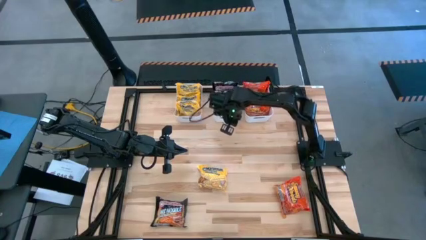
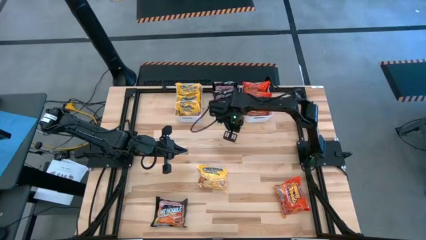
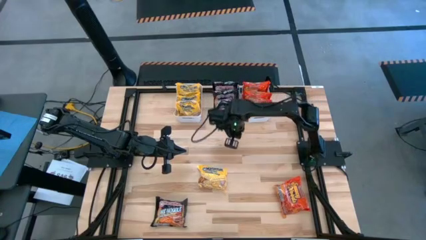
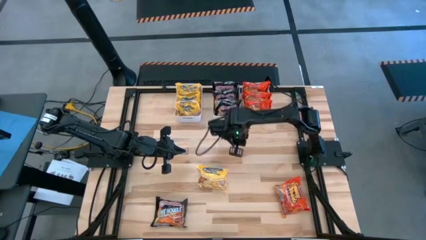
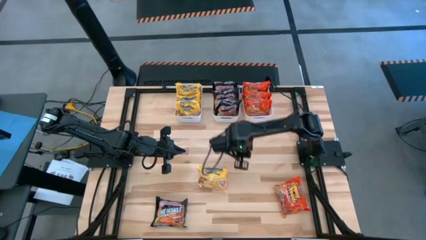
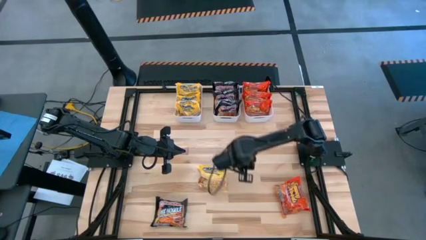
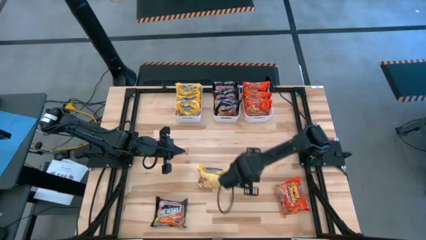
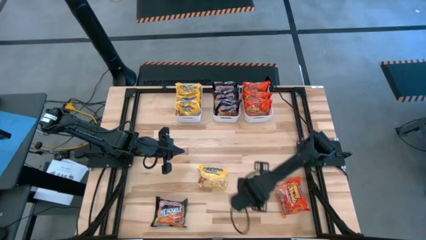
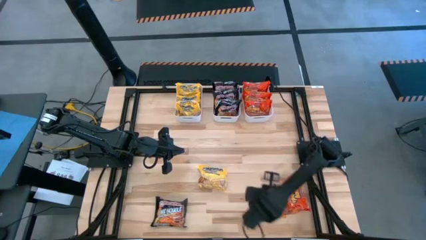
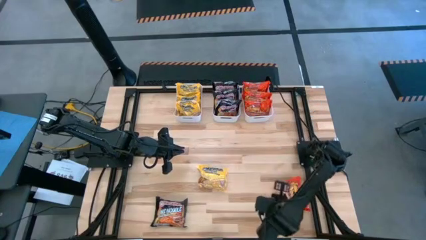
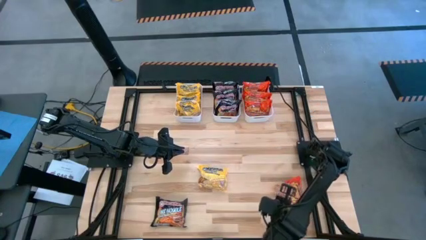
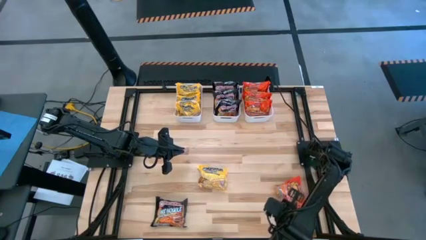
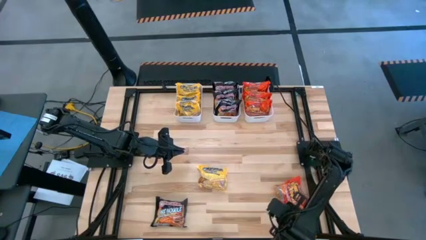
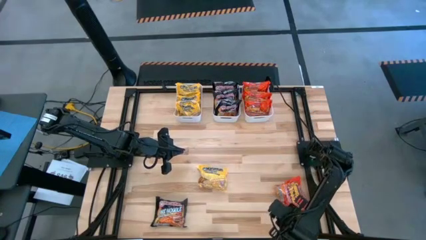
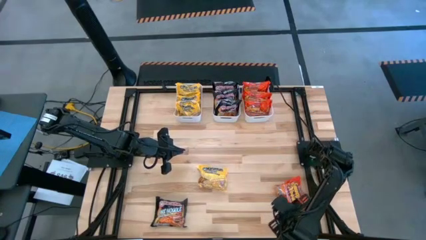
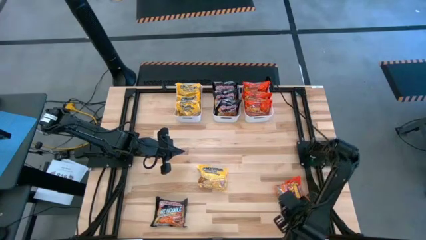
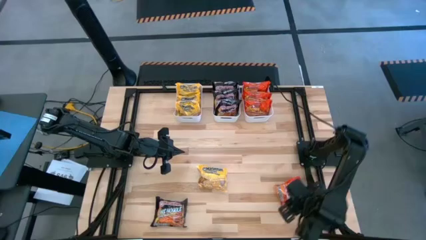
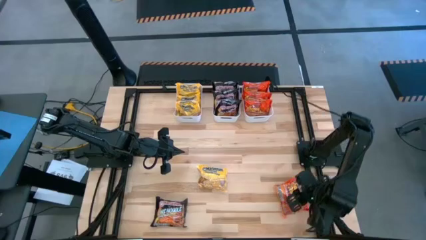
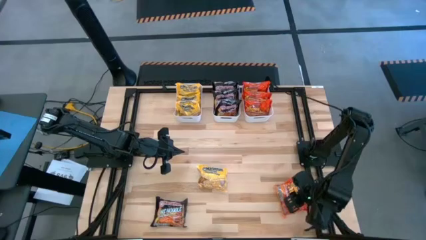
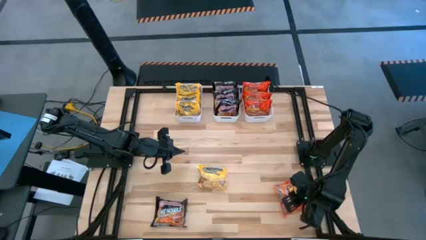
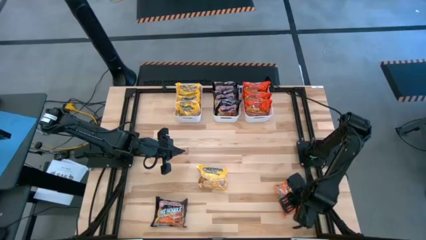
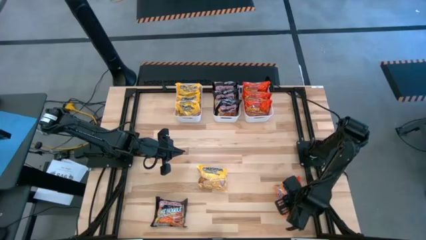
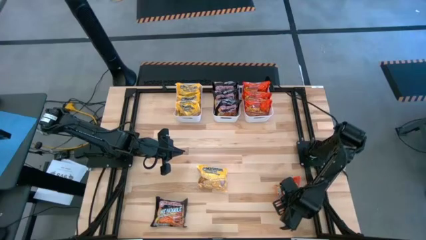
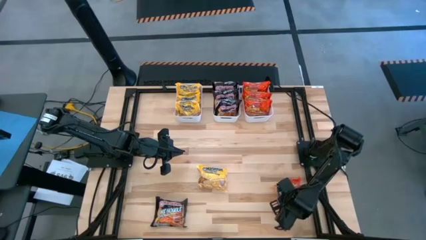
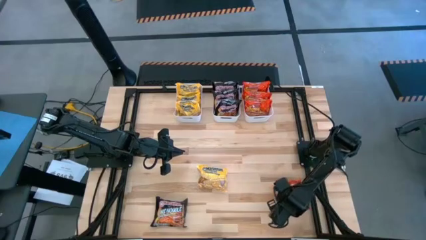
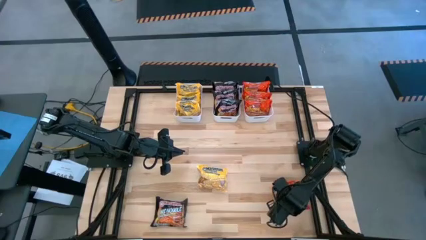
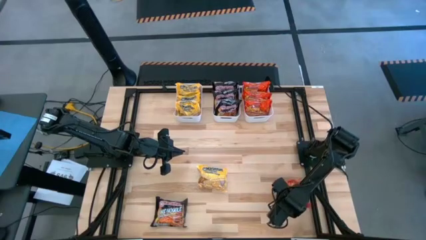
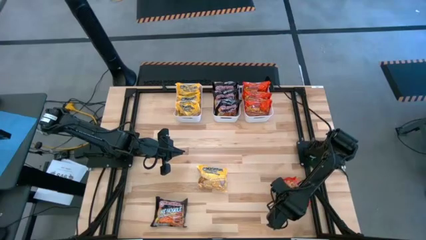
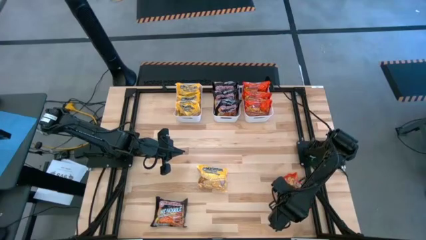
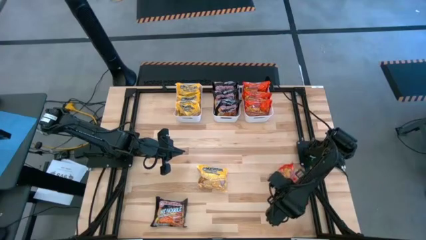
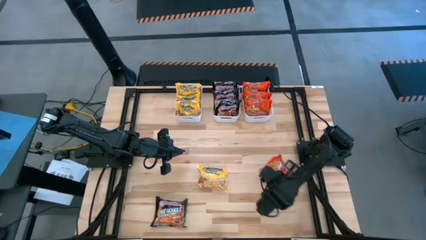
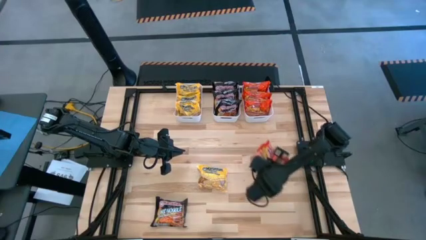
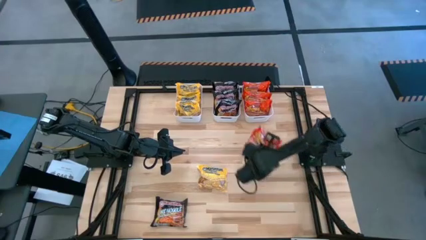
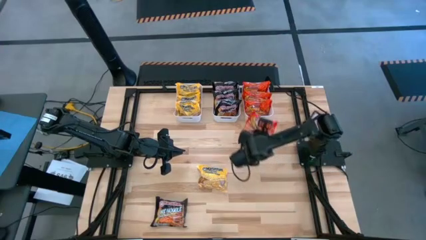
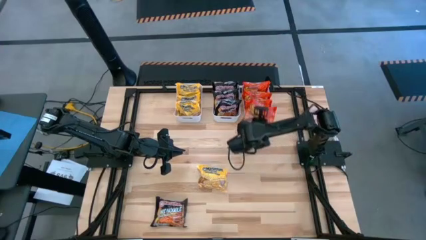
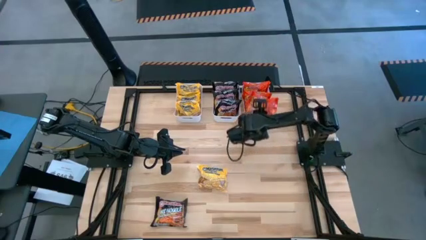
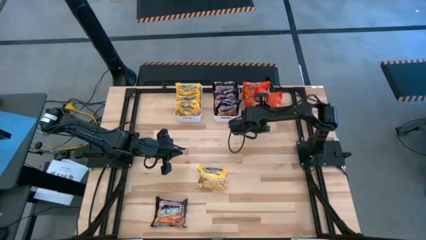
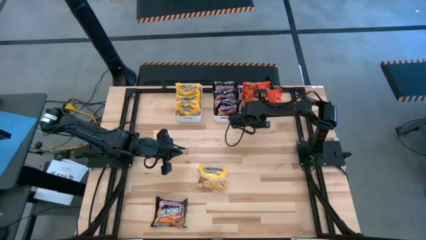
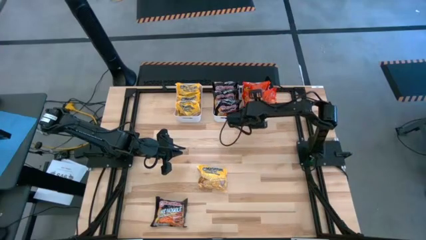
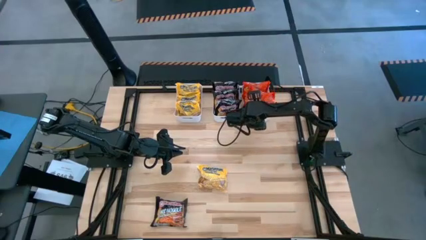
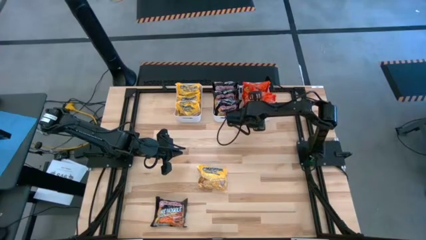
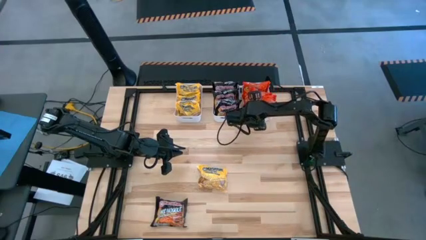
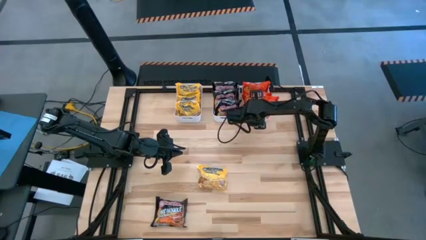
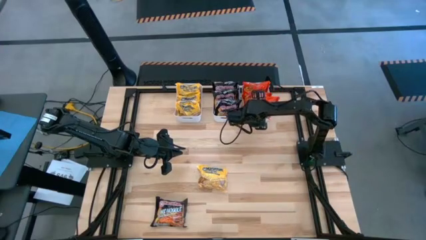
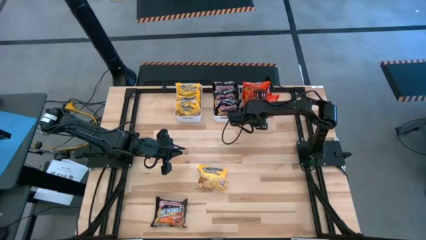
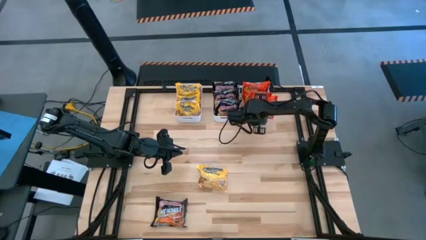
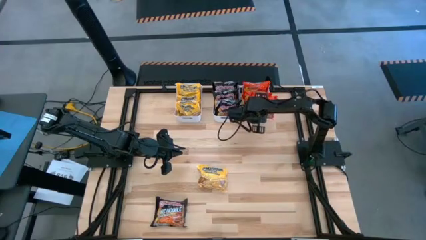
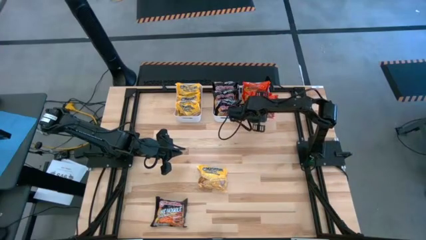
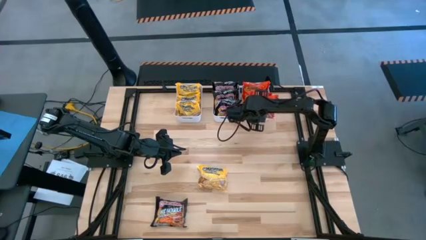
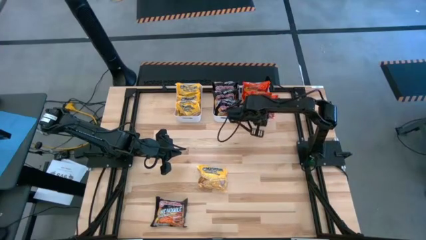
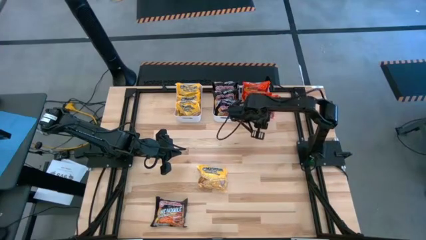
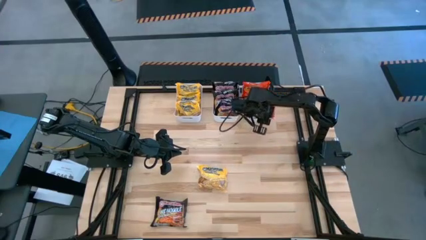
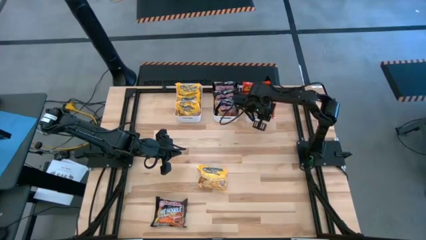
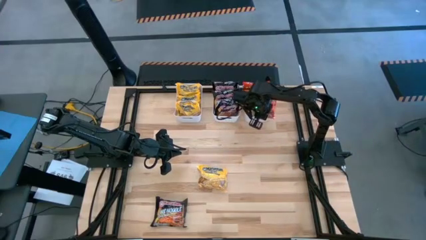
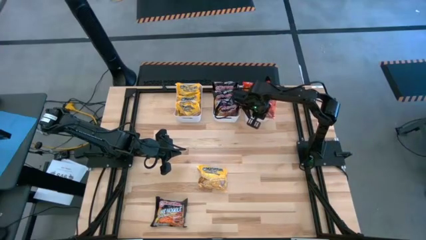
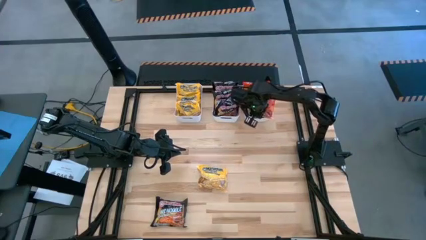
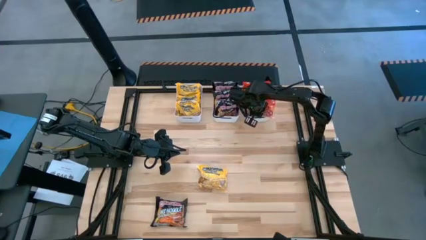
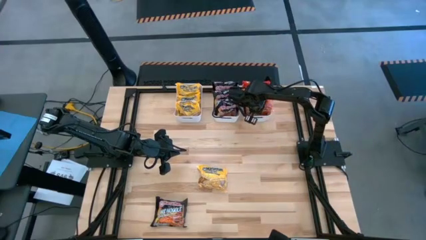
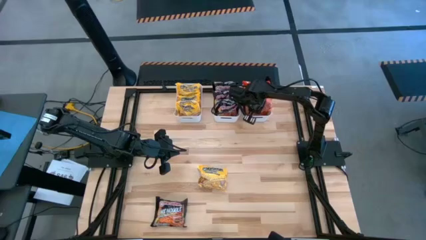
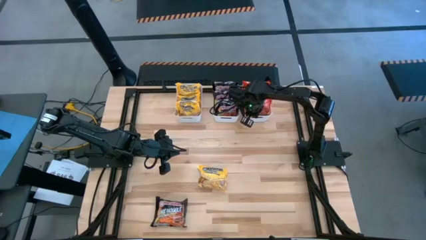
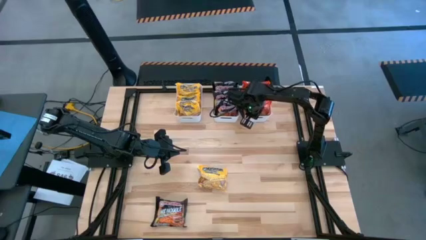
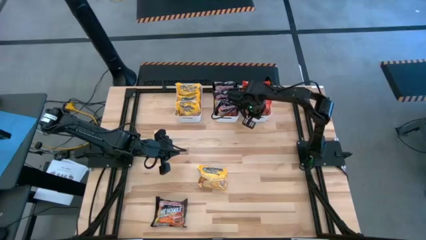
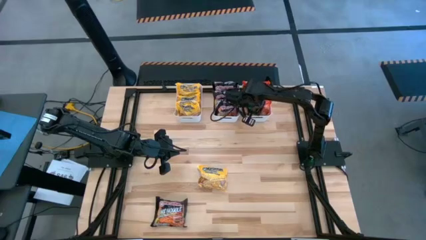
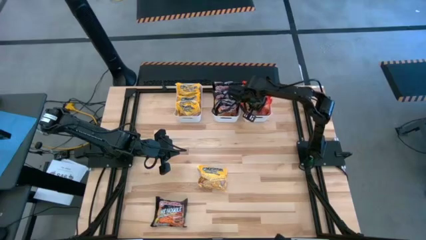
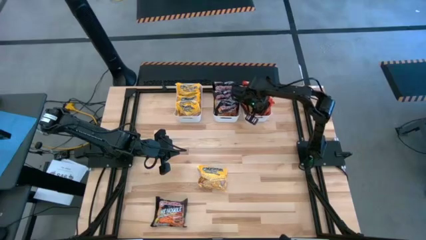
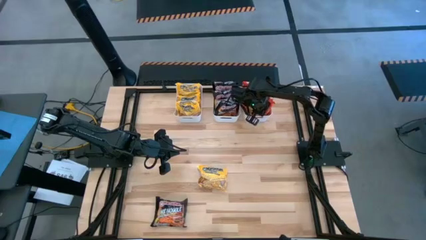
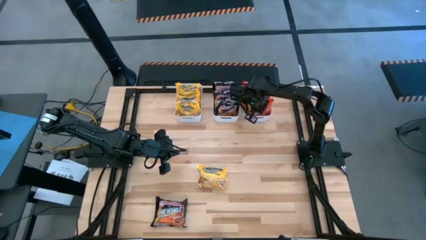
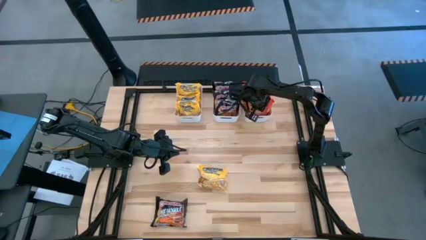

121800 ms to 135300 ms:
Task: Sort Maruchan noodles
Put the orange noodle pack into the right white bin

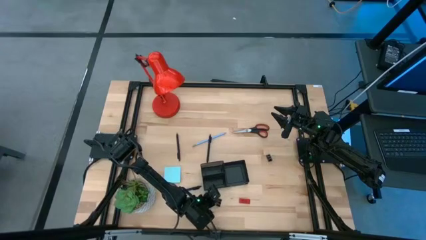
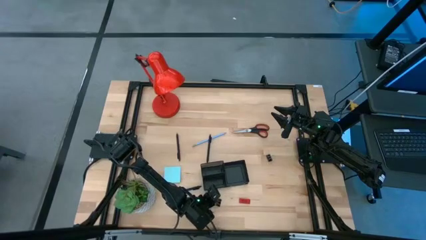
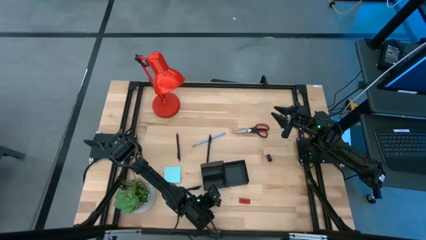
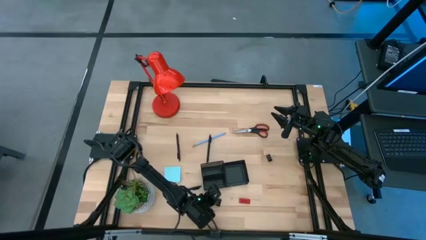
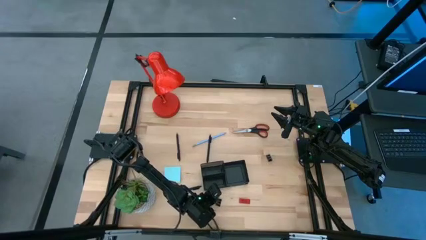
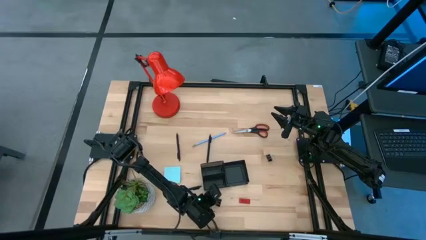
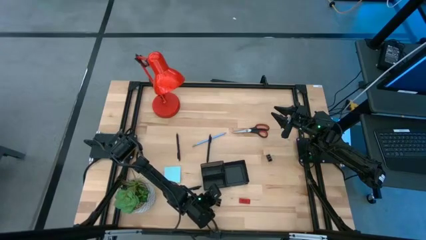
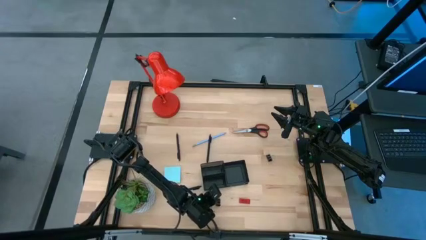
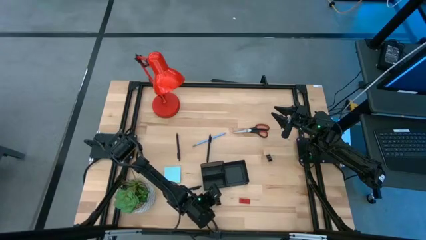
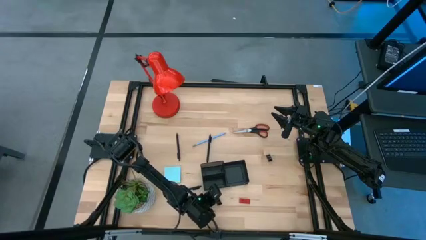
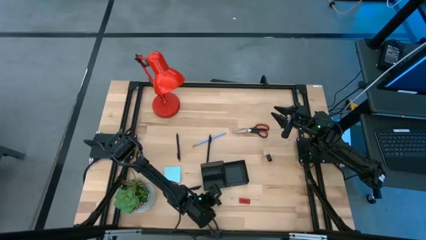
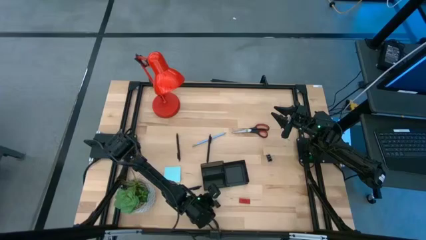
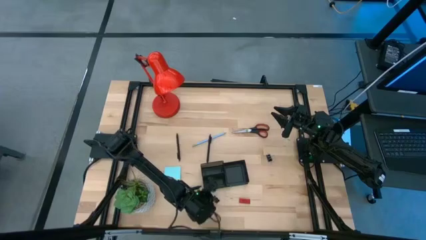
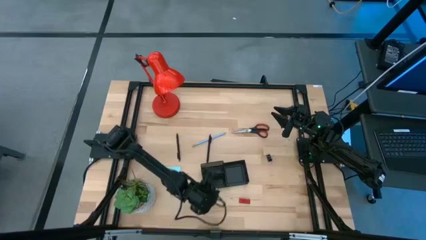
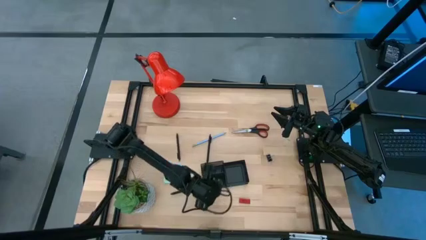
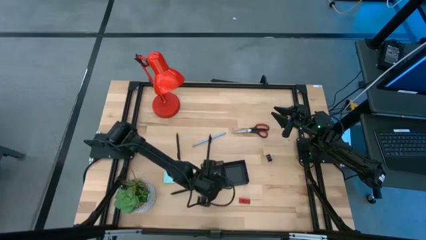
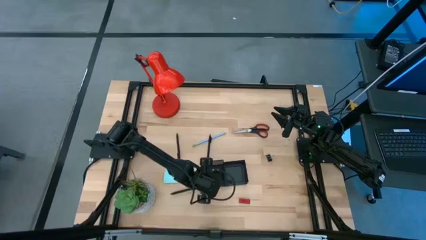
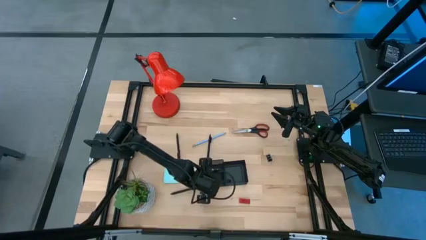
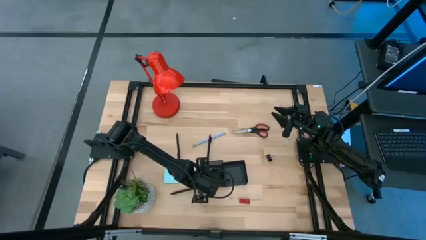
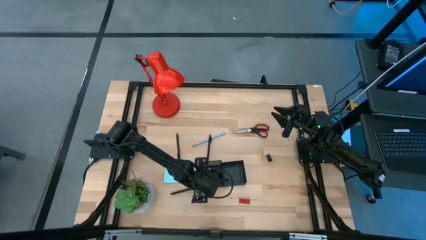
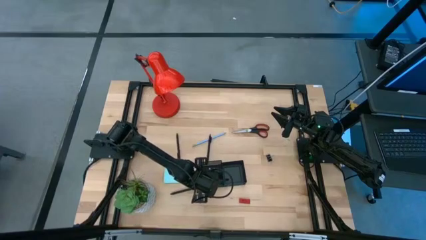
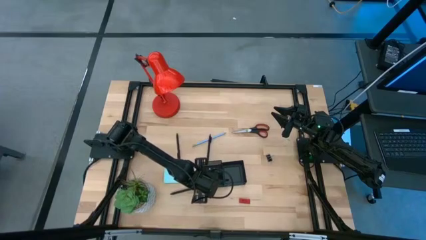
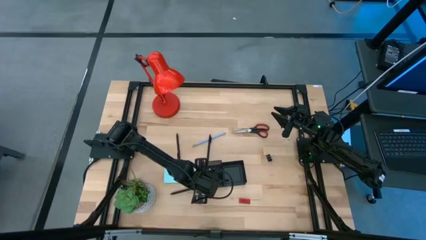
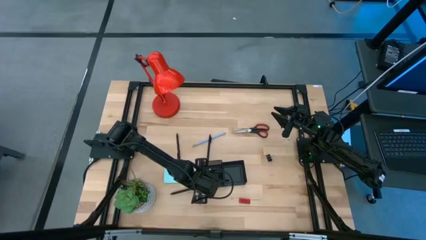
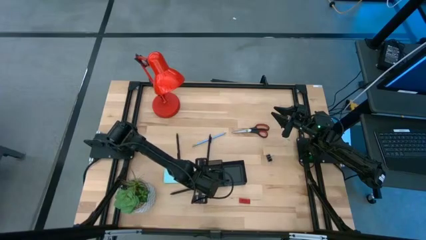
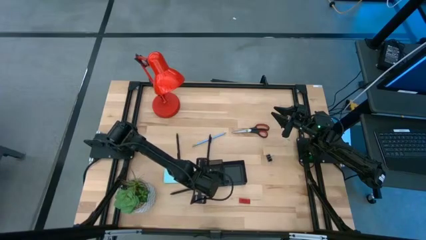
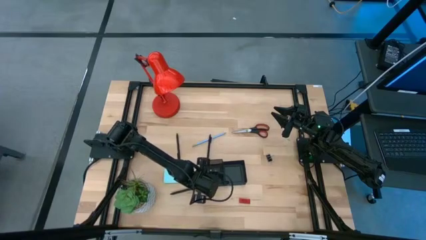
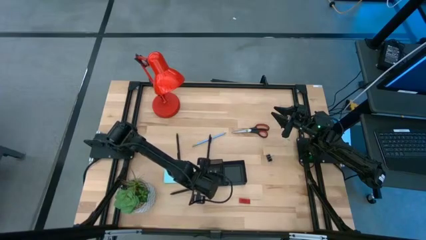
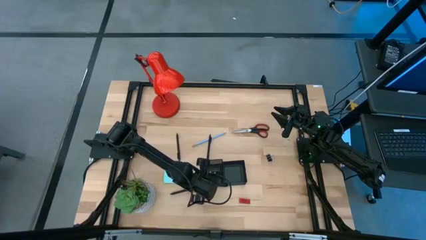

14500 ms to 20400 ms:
Task: Pick and place office supplies into organizer
Put the bottom black binder clip into the black desk organizer
